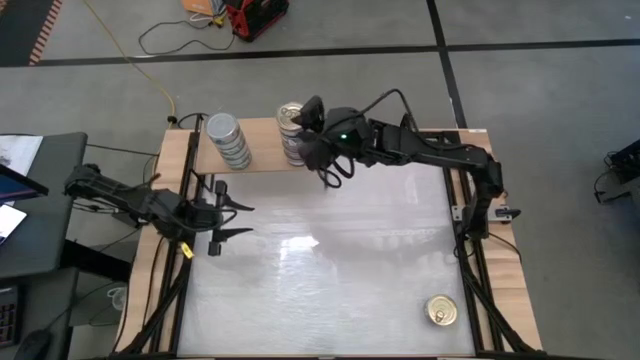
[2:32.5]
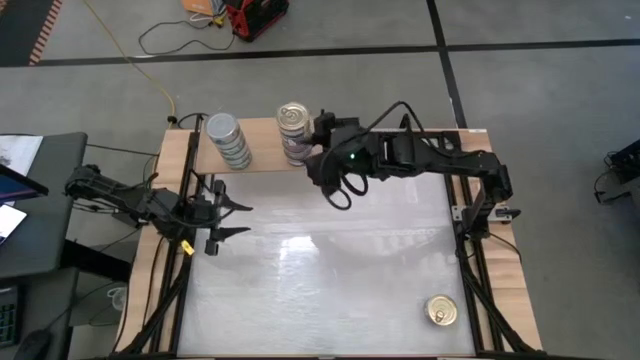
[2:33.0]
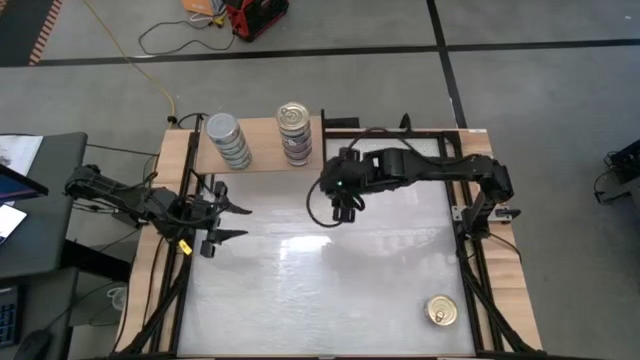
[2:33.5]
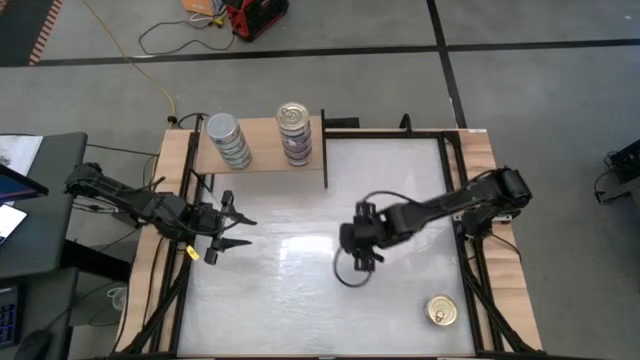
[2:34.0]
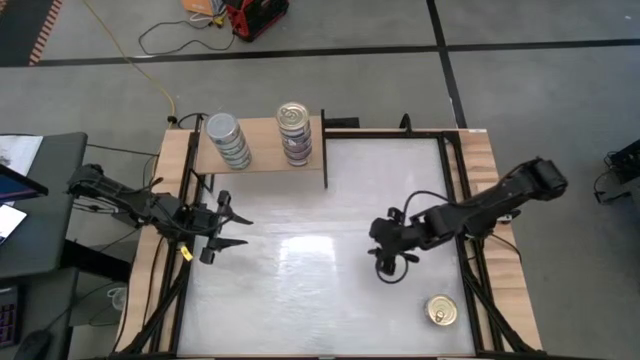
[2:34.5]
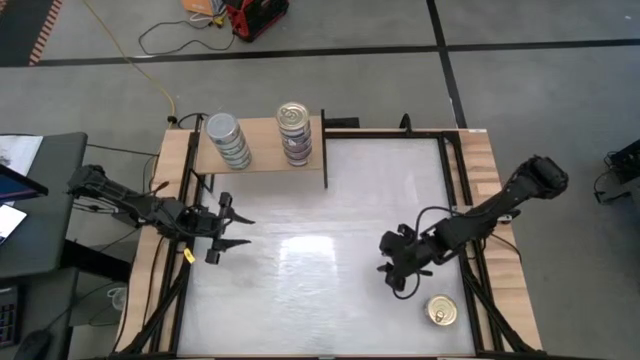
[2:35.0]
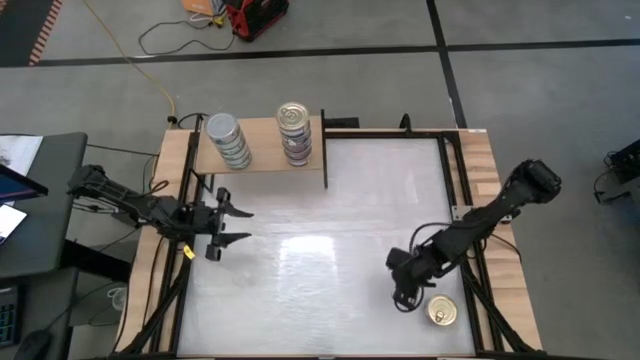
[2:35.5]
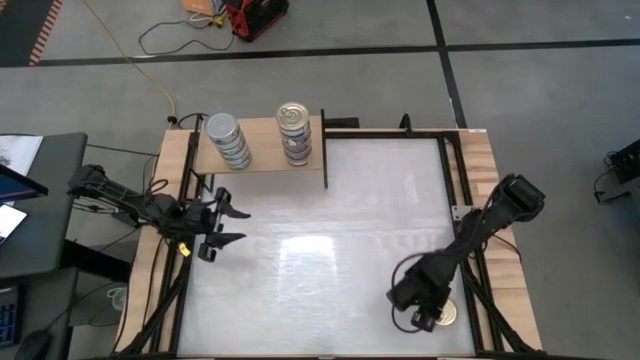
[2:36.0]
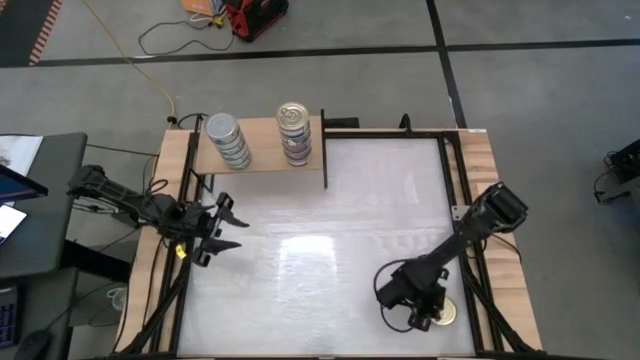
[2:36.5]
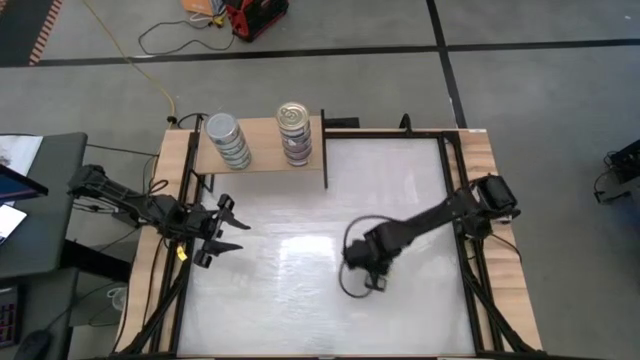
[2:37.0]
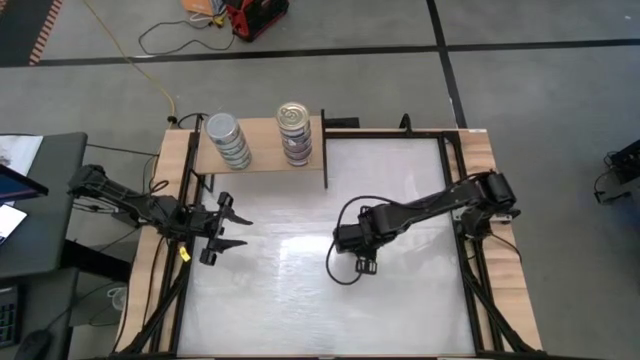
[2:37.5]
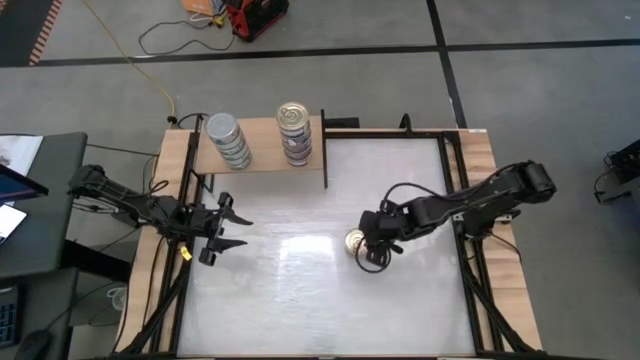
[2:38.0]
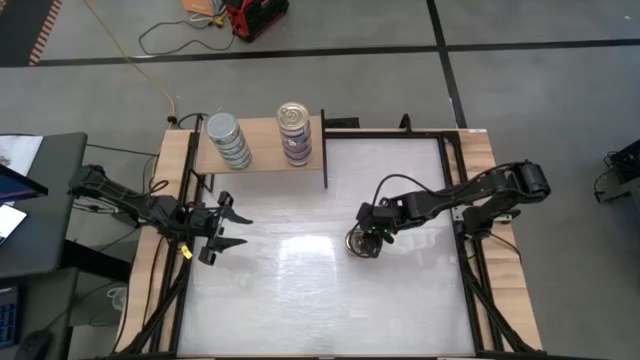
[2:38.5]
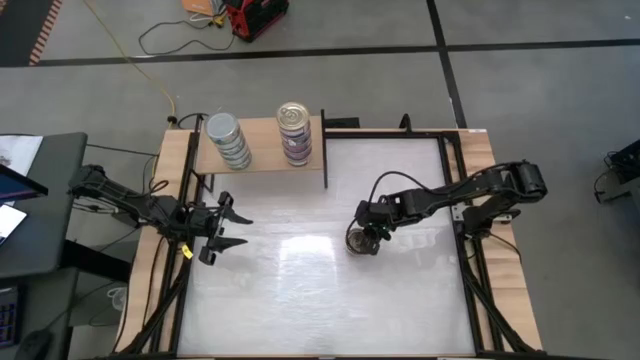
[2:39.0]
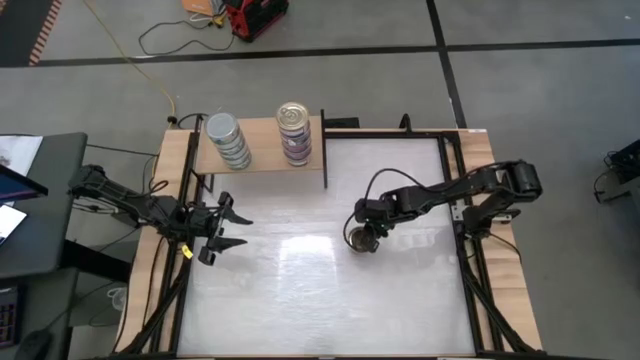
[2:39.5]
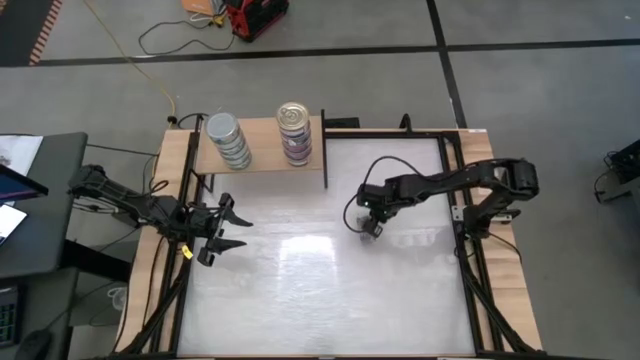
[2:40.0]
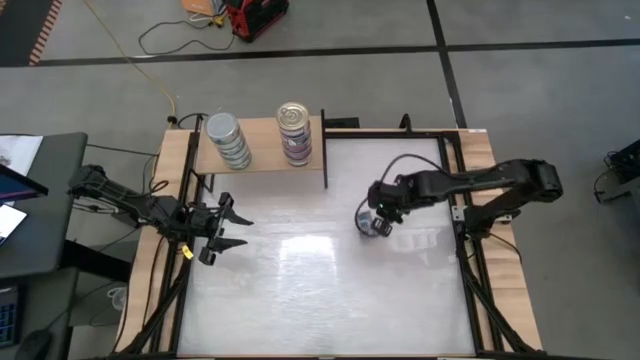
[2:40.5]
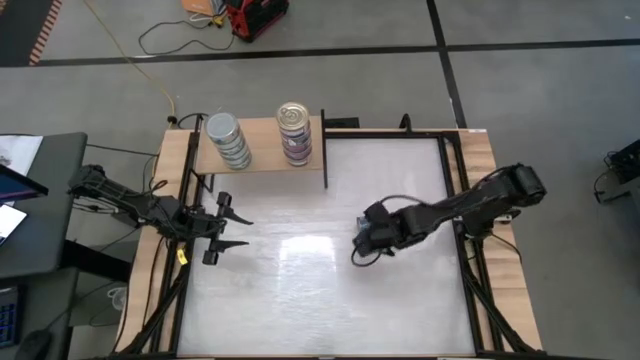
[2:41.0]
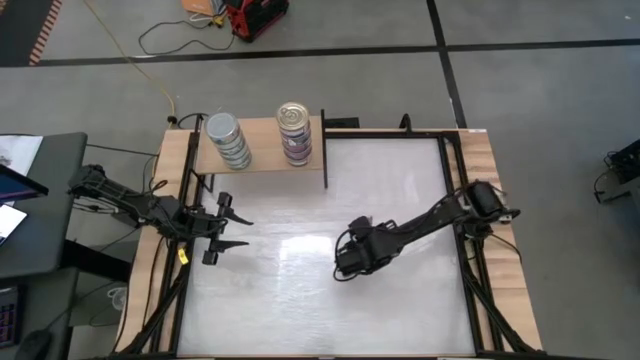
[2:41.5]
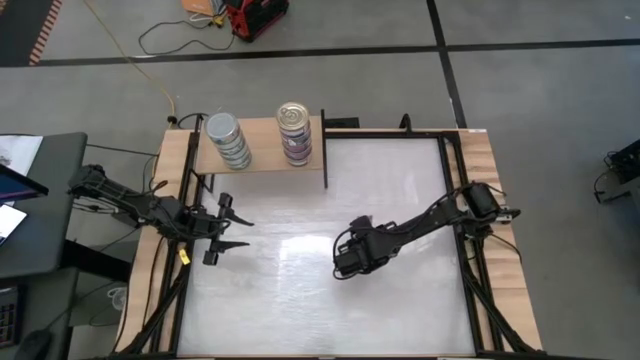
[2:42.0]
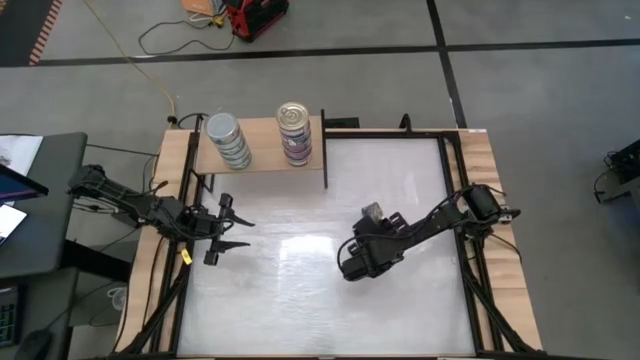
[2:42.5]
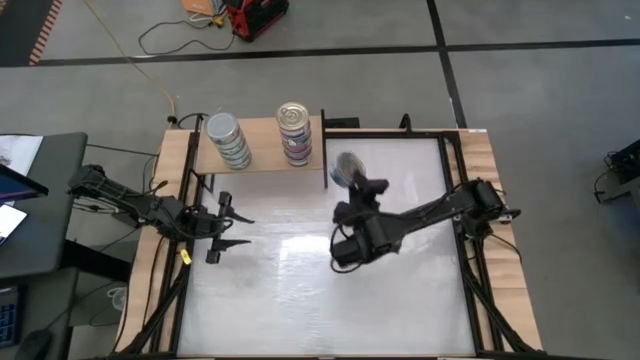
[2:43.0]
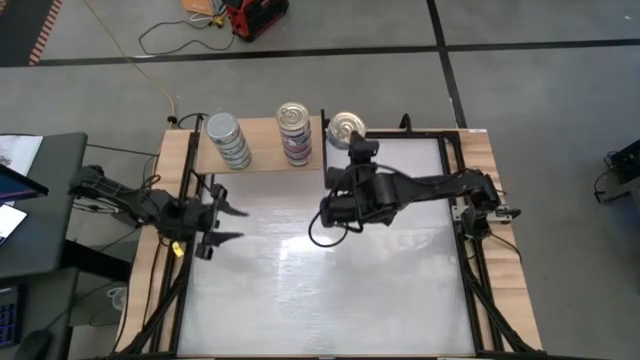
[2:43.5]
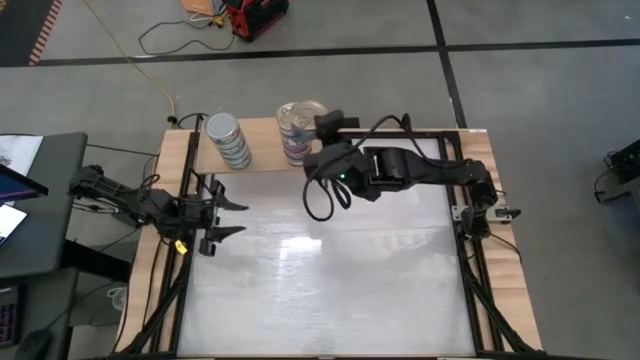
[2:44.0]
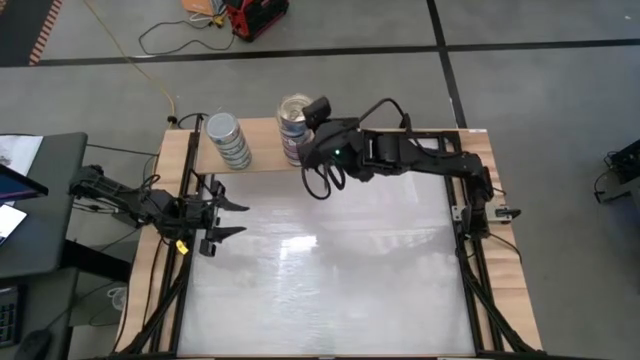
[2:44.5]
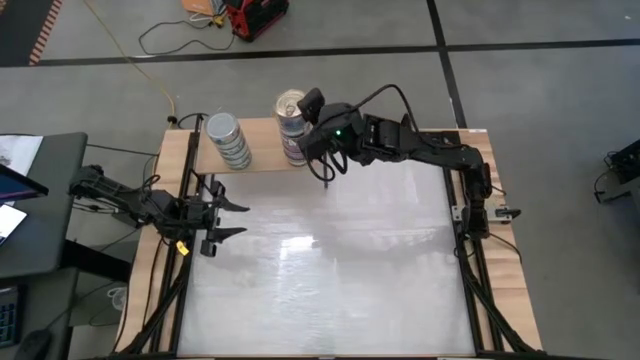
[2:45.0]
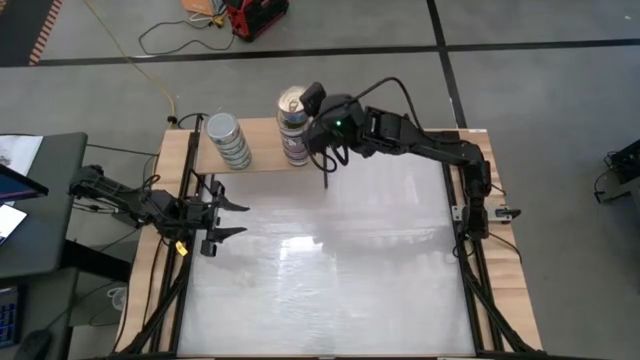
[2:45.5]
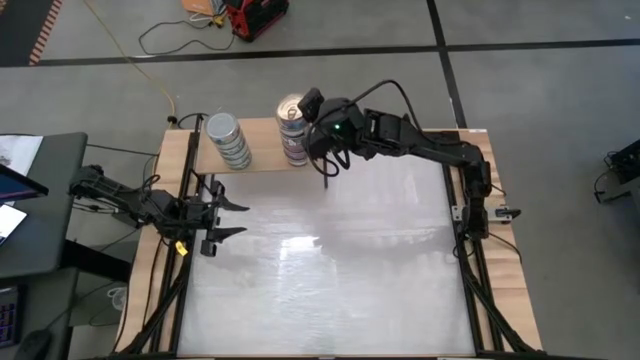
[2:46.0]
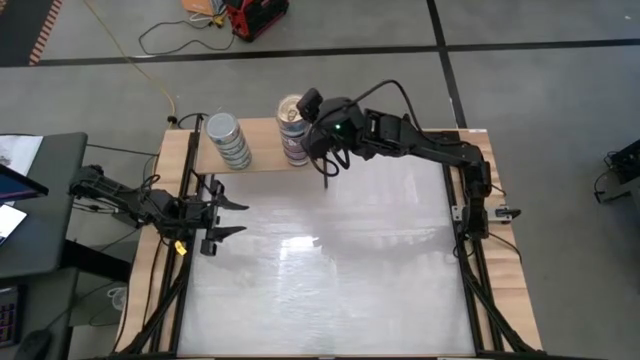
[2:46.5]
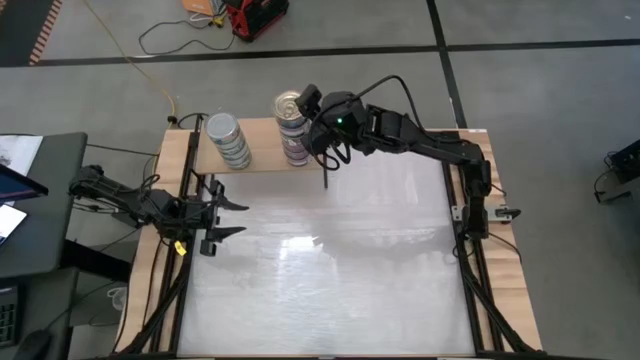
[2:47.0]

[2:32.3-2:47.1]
Task: Stack canned seafood by type on shelf
Stack the blue-pink tuna can on top of the other blue-pink tuna cans on the shelf

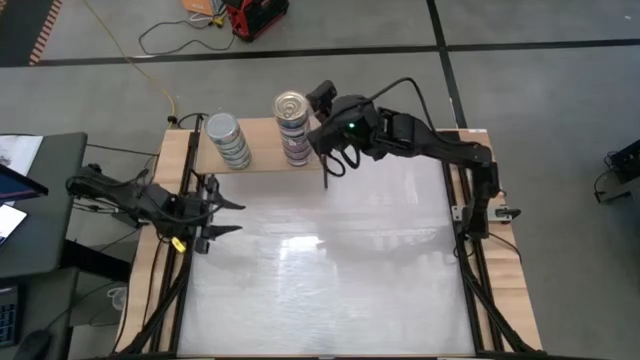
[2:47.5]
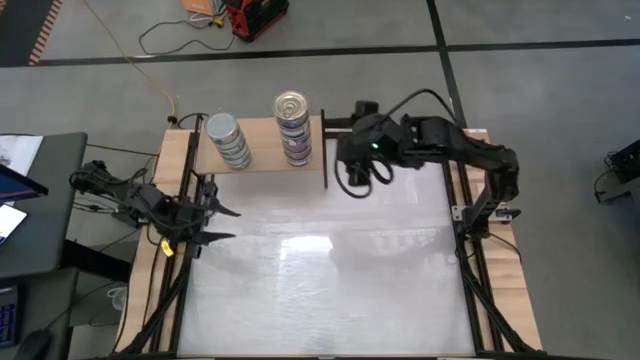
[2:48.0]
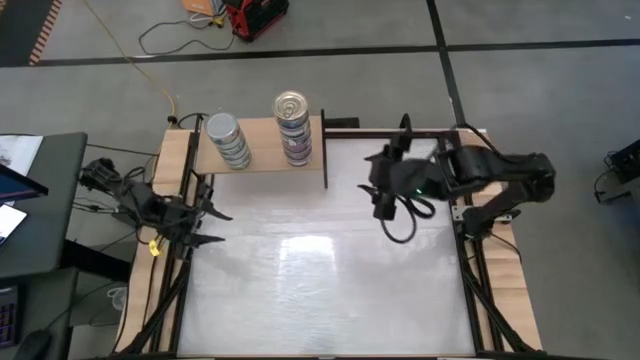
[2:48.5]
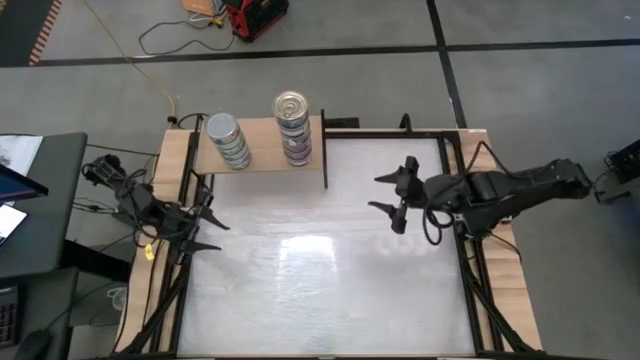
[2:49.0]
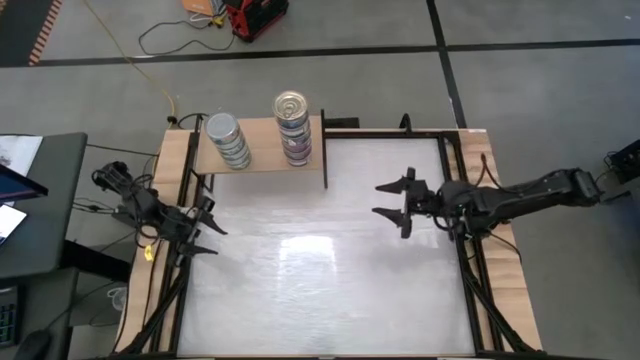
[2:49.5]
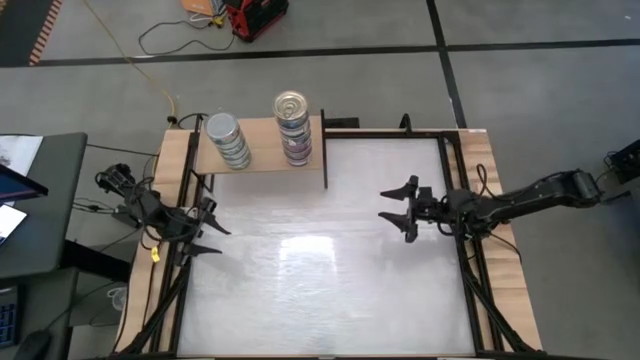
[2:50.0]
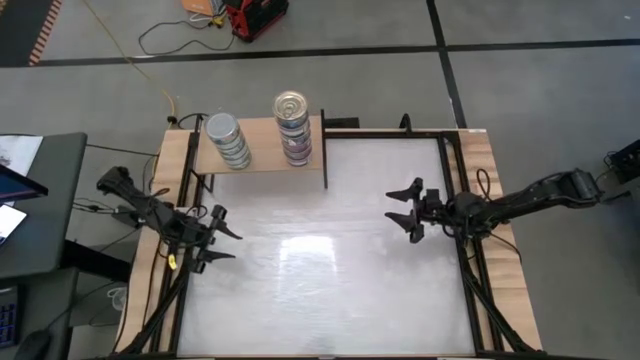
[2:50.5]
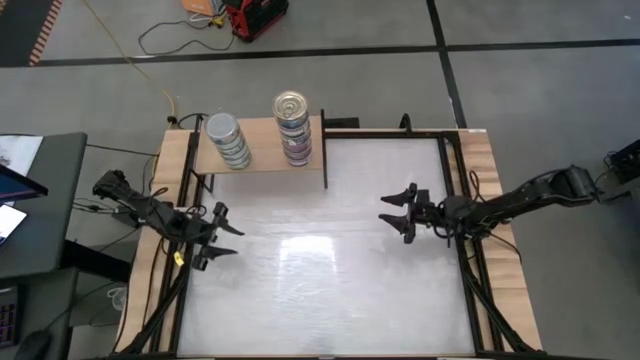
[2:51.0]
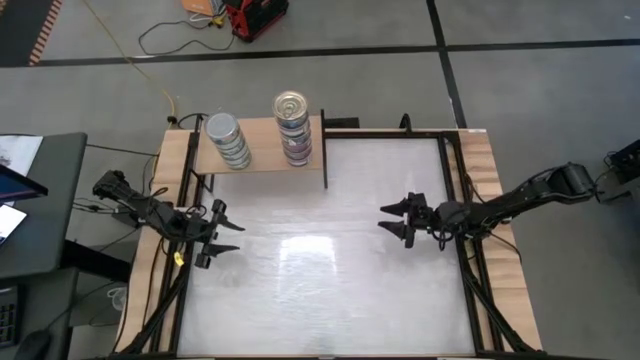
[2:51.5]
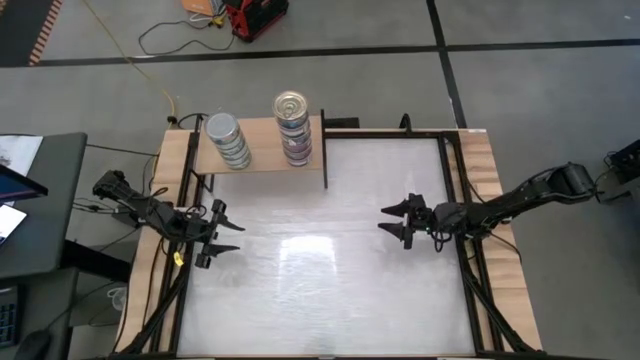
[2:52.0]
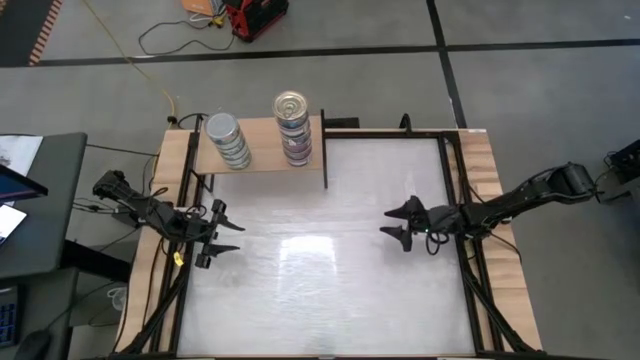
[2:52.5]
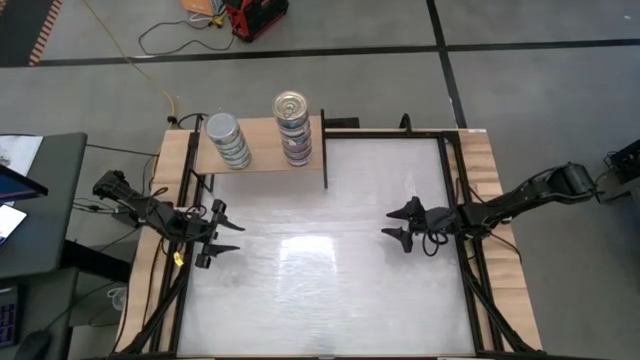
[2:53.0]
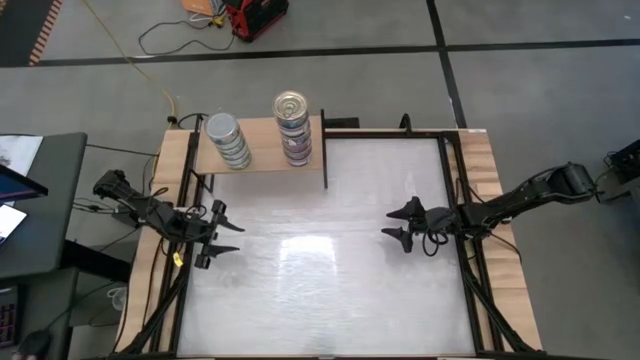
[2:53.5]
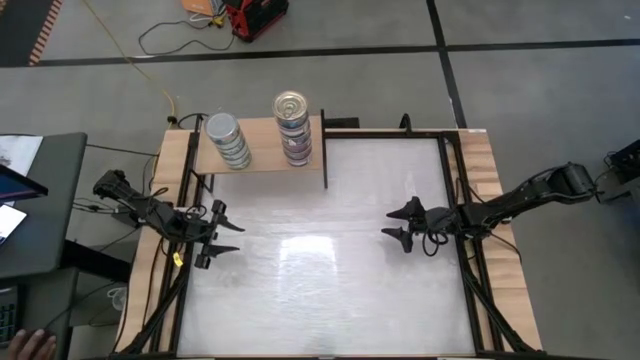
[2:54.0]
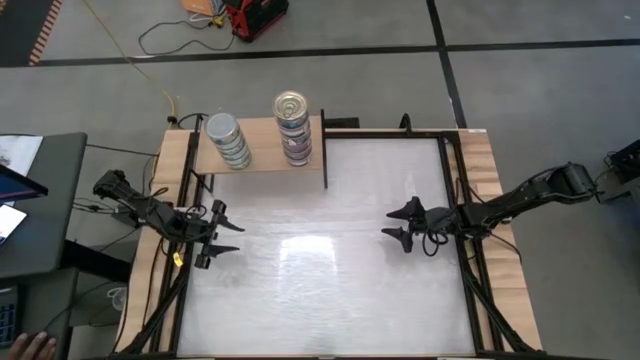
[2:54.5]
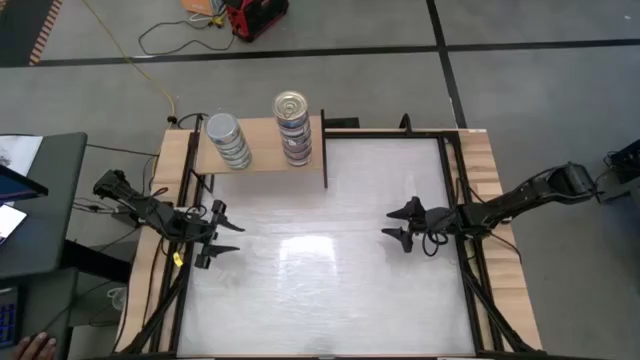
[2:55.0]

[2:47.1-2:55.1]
Return to Home Position
